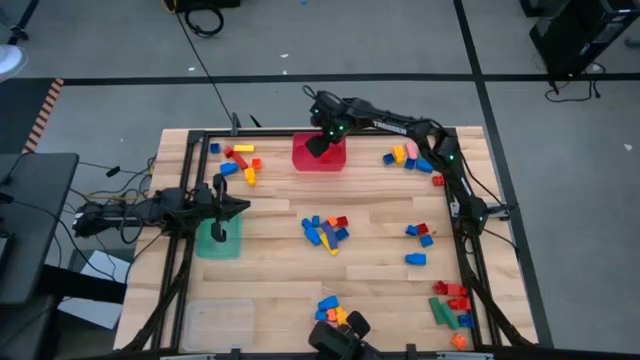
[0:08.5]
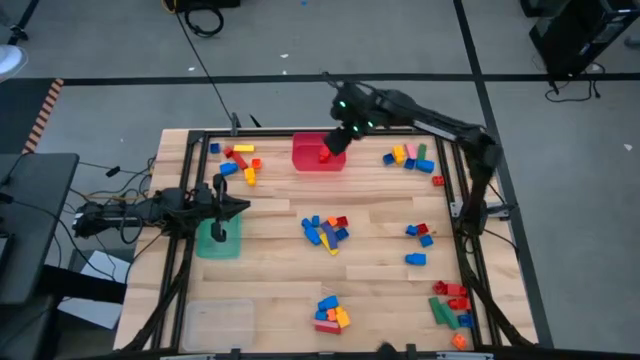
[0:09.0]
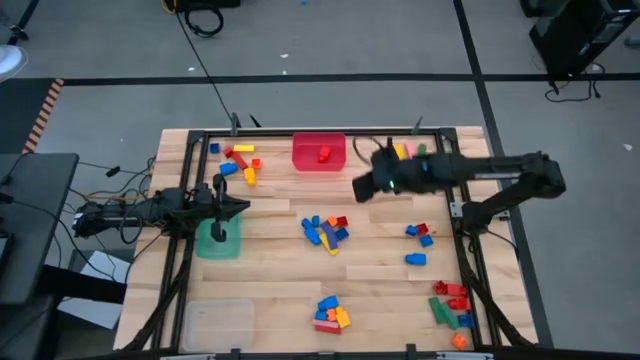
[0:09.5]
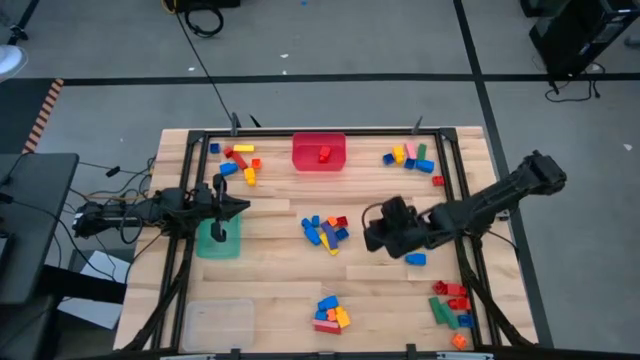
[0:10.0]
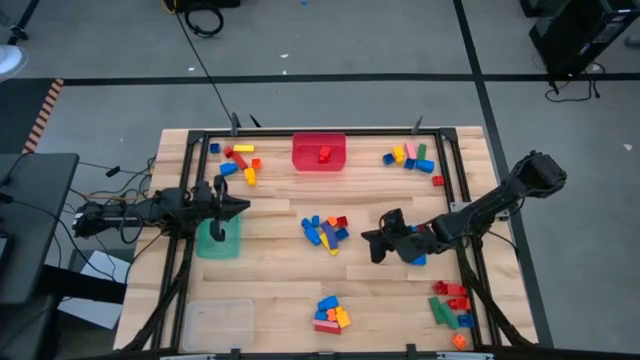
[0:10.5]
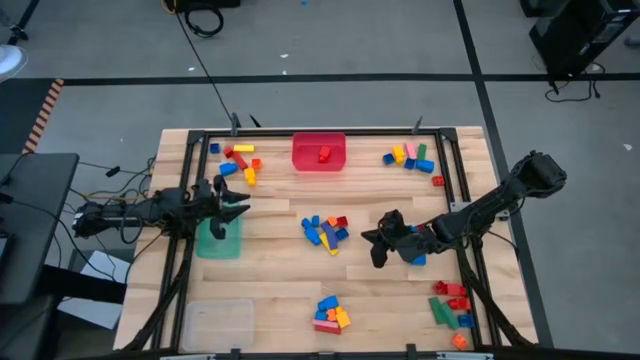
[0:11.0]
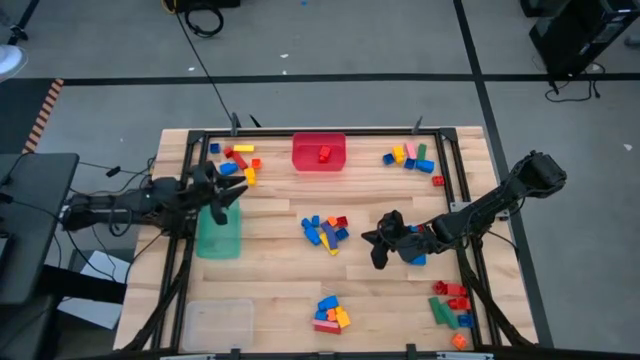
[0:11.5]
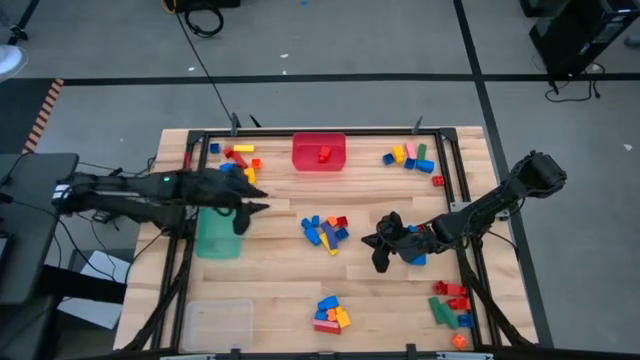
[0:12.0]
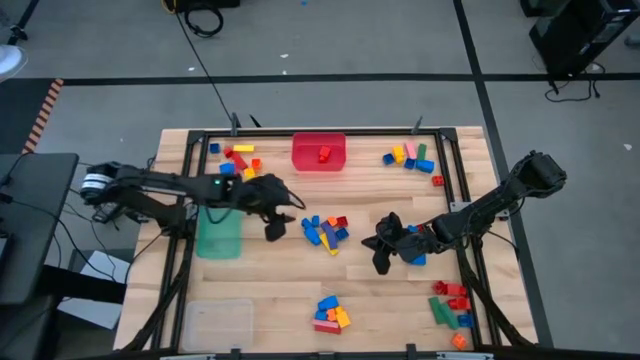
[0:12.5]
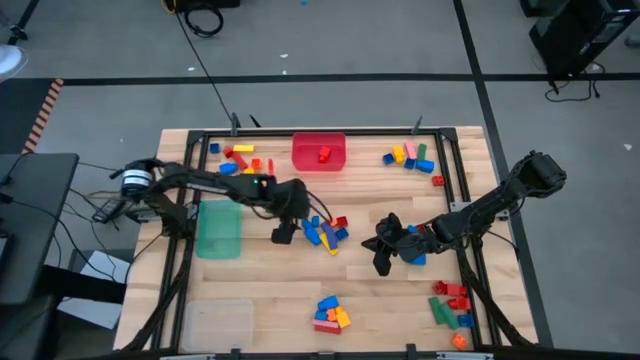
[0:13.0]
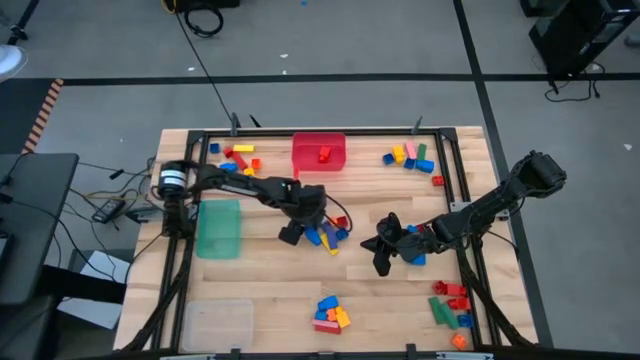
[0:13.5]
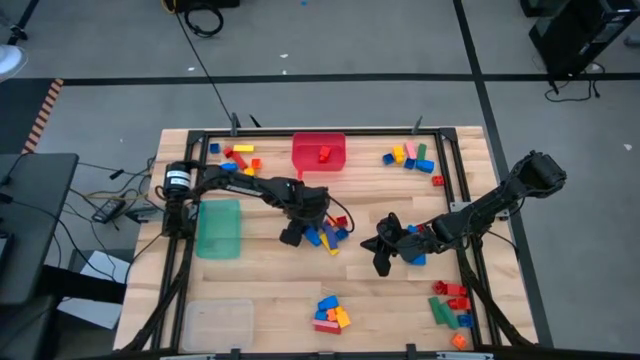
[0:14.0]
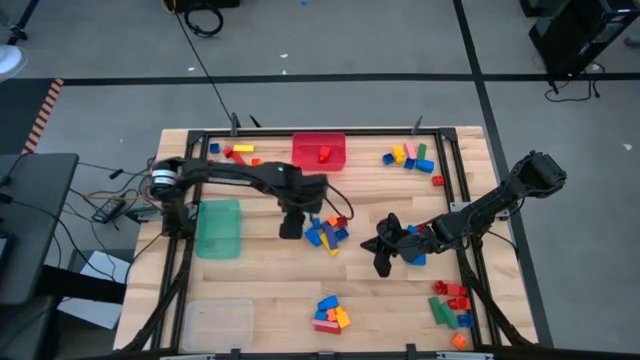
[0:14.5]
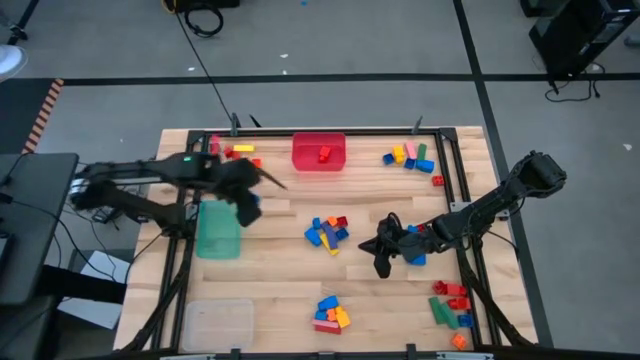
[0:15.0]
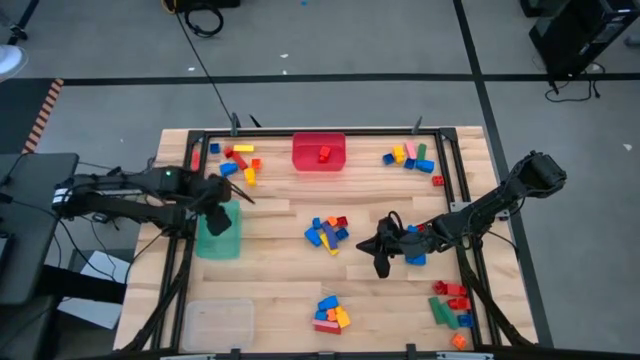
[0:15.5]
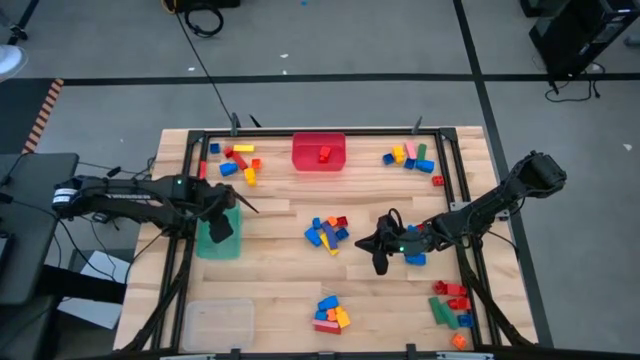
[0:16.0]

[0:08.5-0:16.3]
Task: Sort blocks by size
Put the blue 4 studded building block into the teal bin

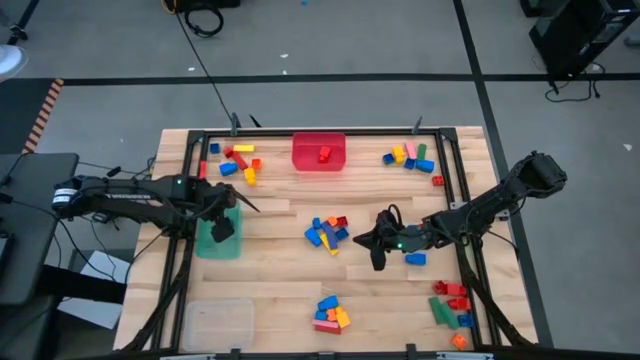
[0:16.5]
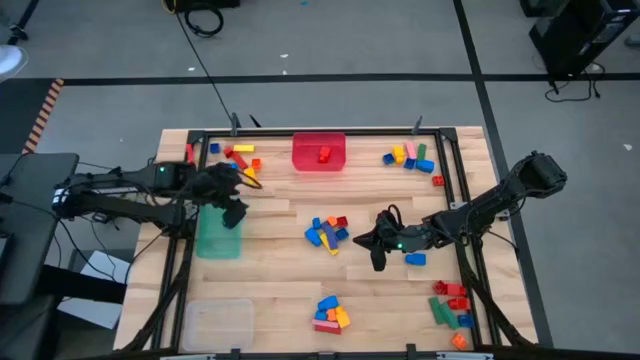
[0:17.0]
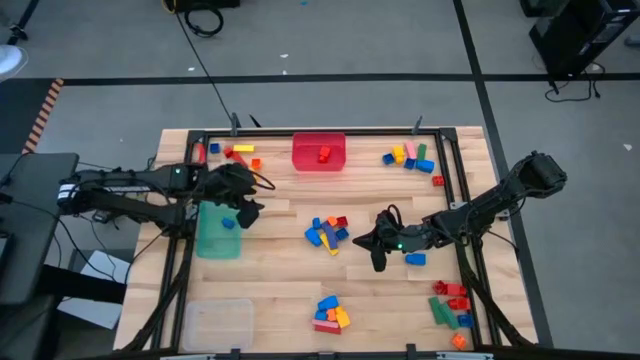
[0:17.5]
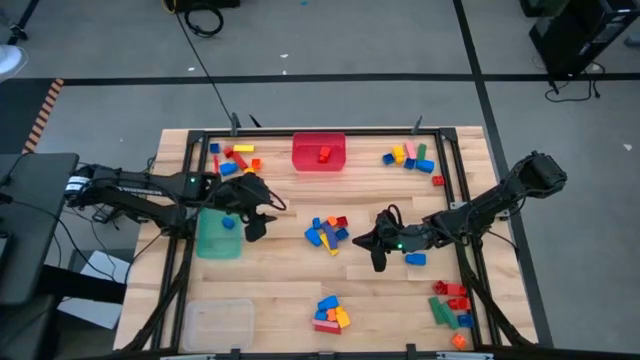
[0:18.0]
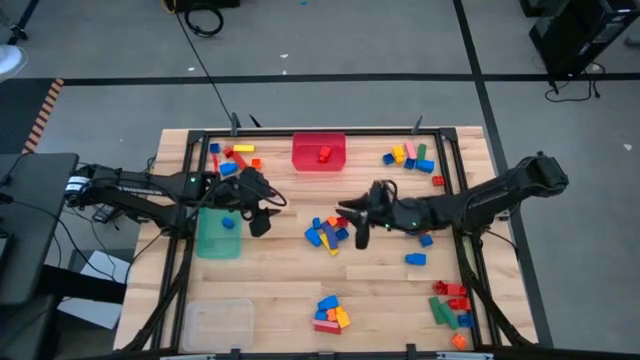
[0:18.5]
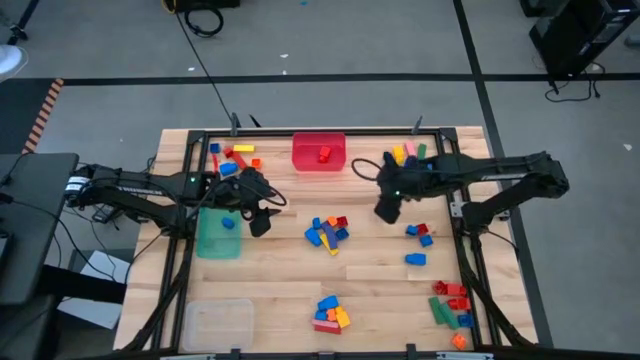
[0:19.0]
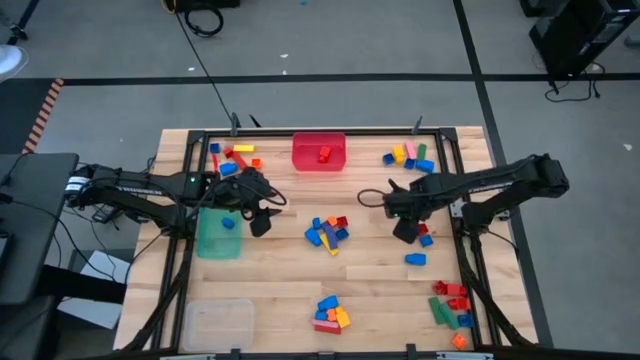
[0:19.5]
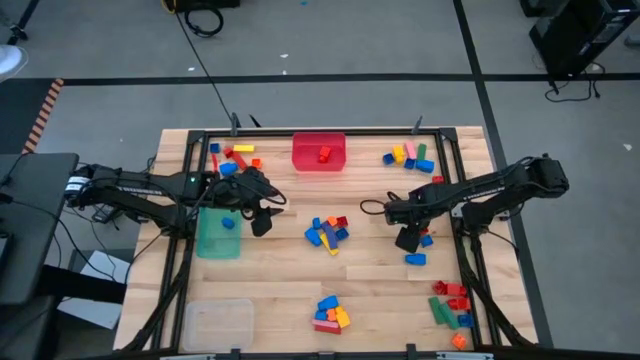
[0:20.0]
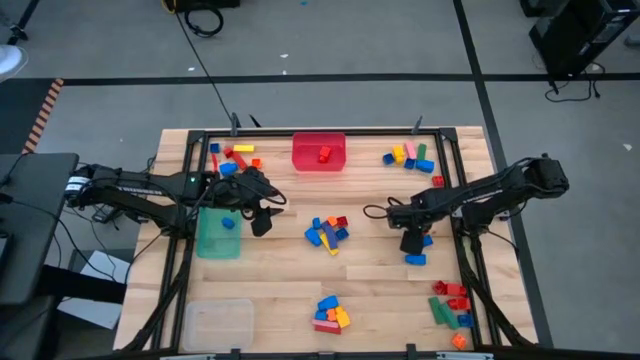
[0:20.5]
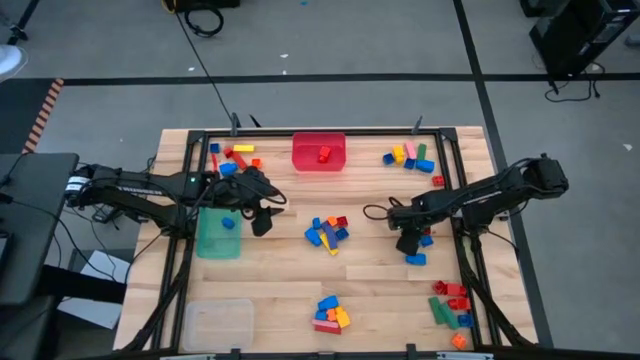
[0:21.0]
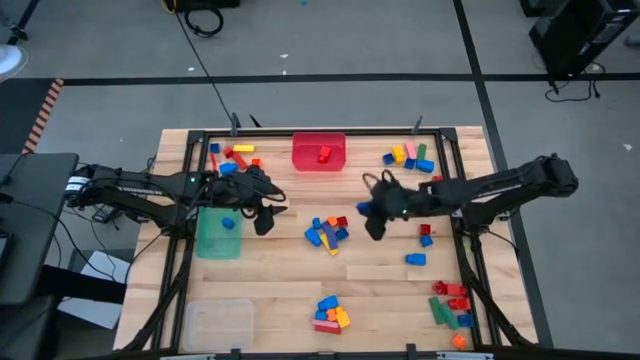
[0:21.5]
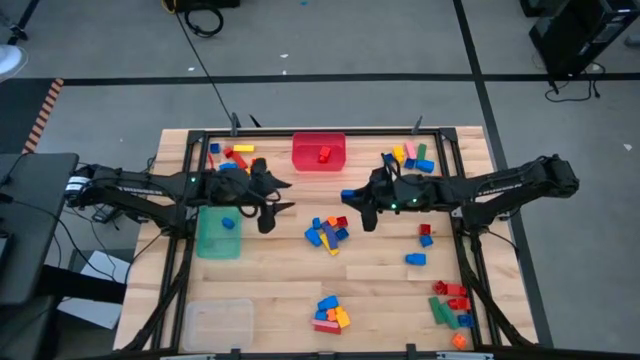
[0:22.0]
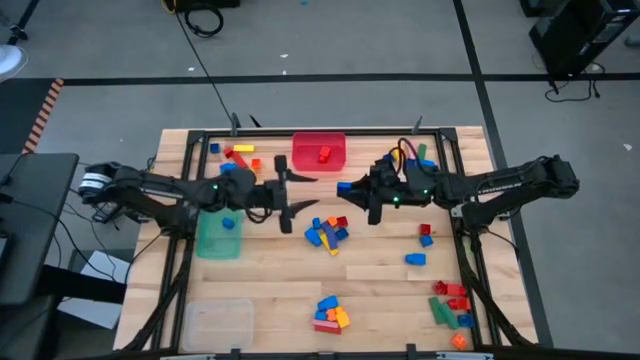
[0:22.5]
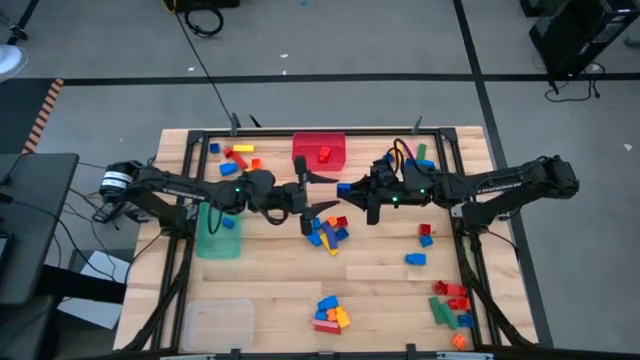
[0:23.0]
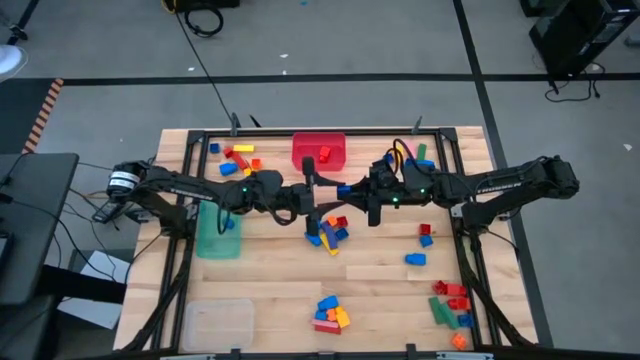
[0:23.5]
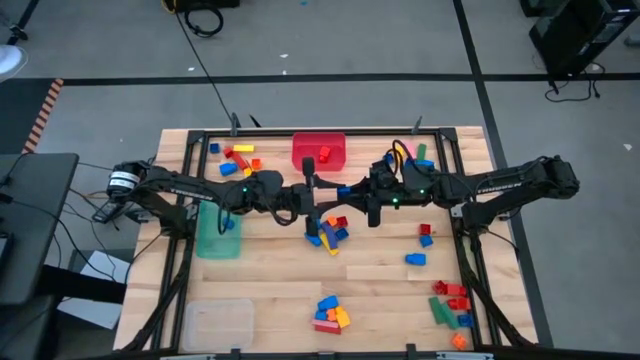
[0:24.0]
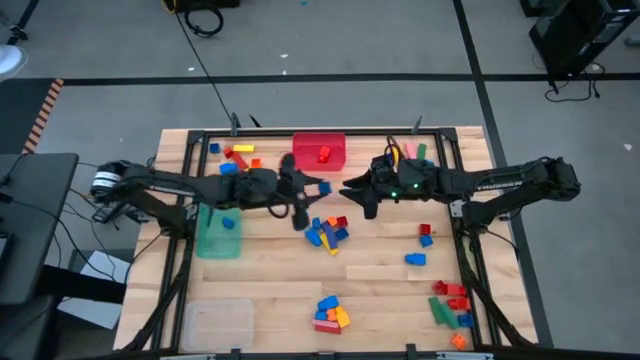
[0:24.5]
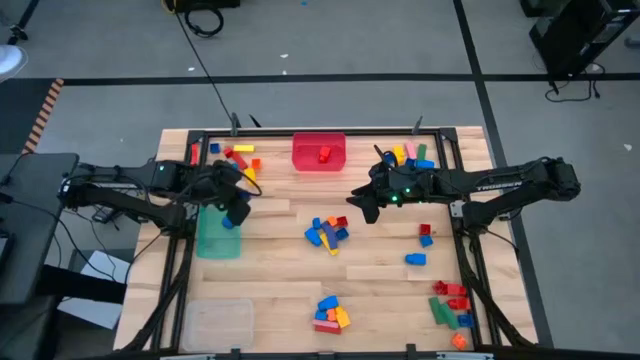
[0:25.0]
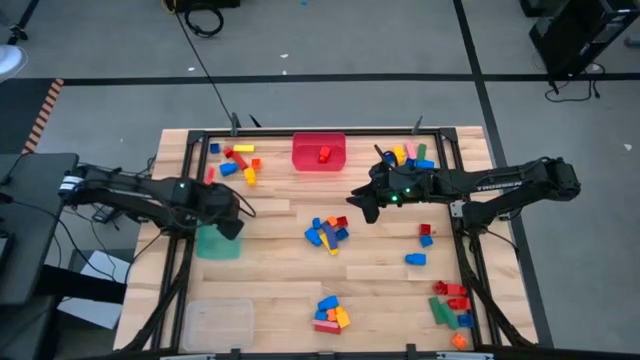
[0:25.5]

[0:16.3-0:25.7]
Put the blue 4 studded building block into the teal bin

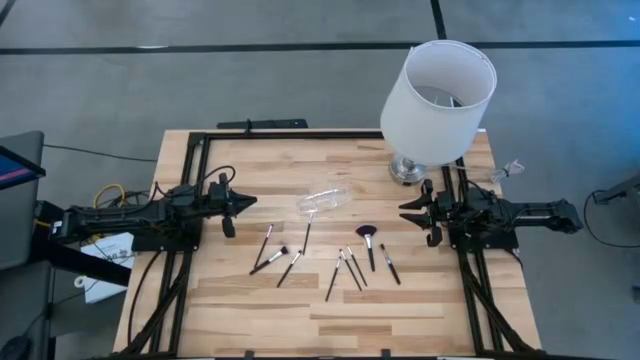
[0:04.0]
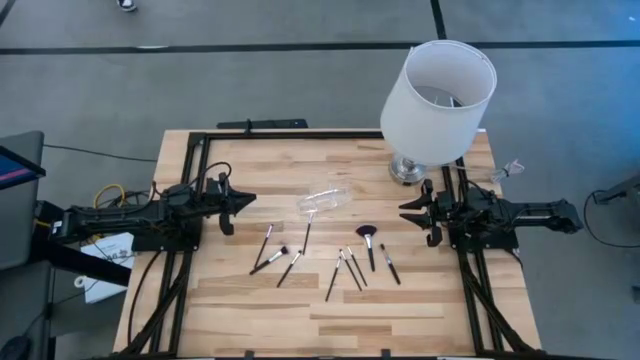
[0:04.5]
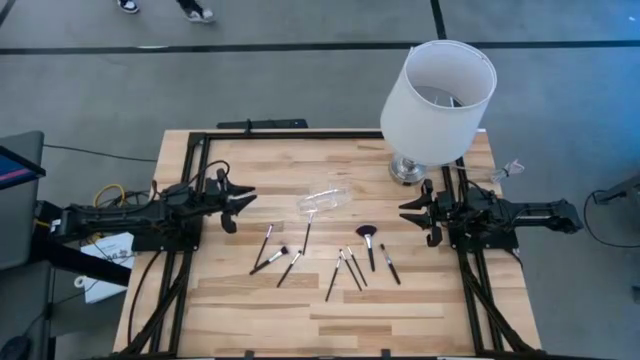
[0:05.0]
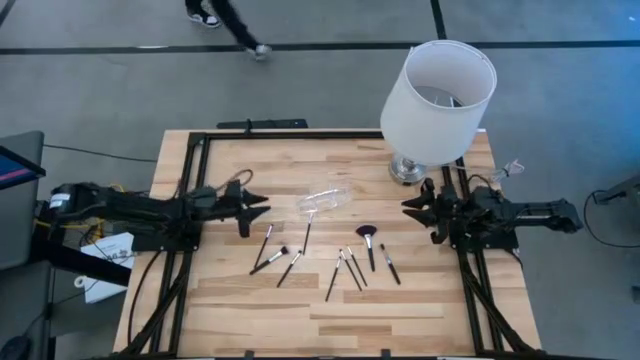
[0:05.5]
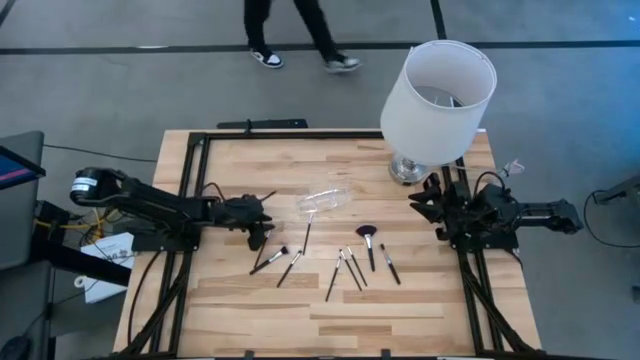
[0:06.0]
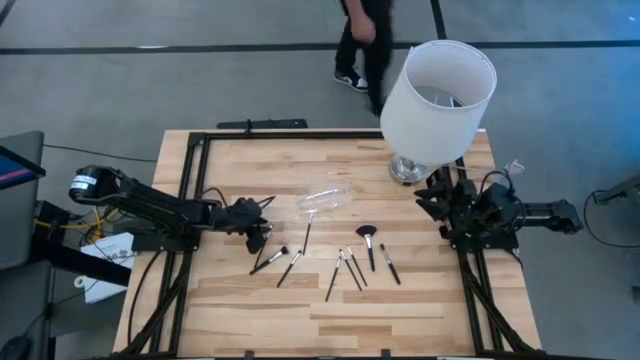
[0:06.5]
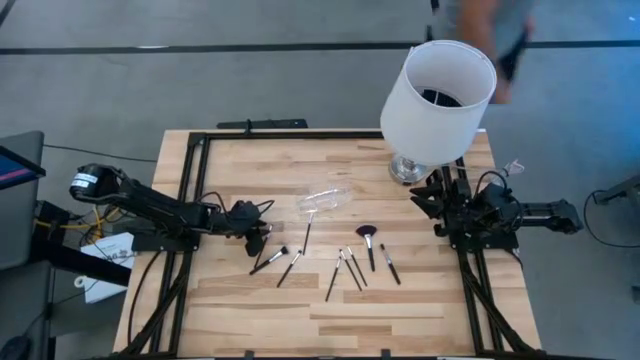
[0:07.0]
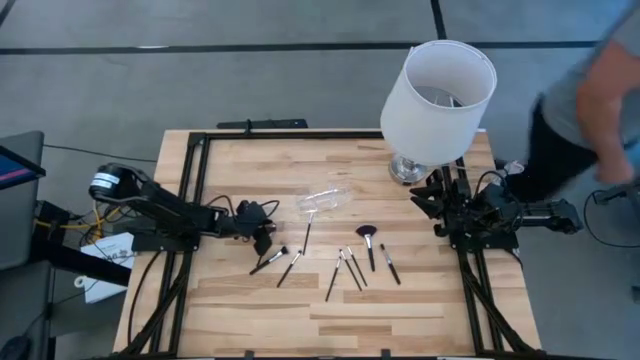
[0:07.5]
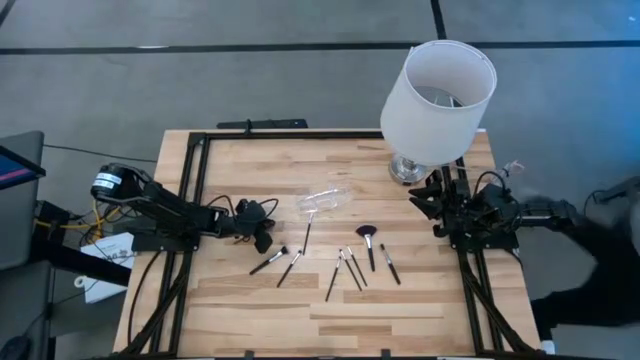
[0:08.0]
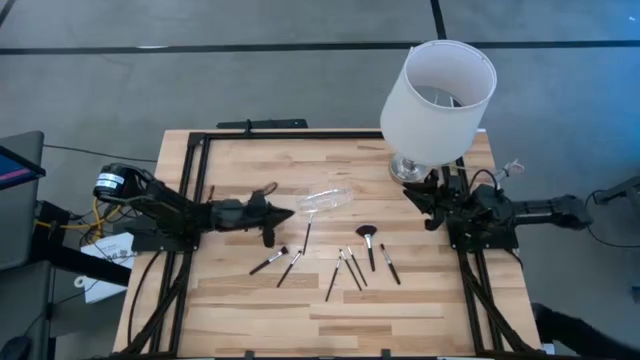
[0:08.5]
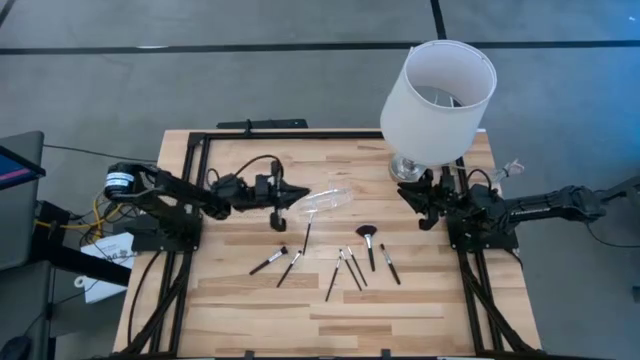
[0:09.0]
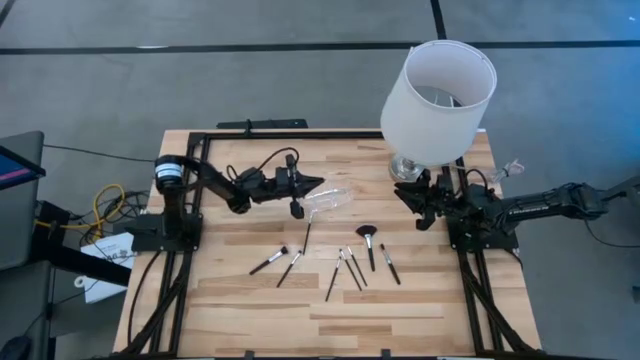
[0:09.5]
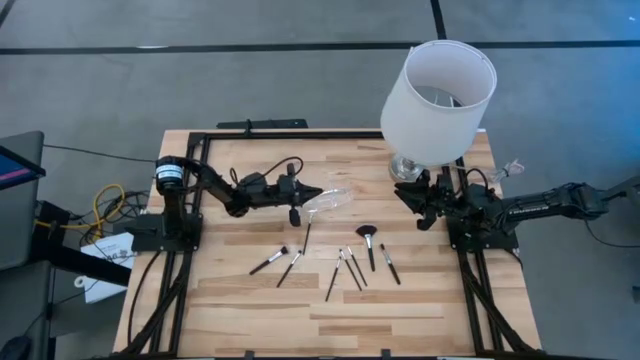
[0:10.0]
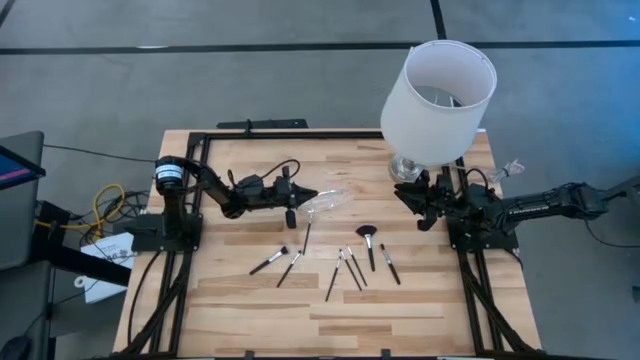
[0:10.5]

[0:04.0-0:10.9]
Task: Pick & Place Makeup Supplies
Put the black makeup brush into the transparent organizer
